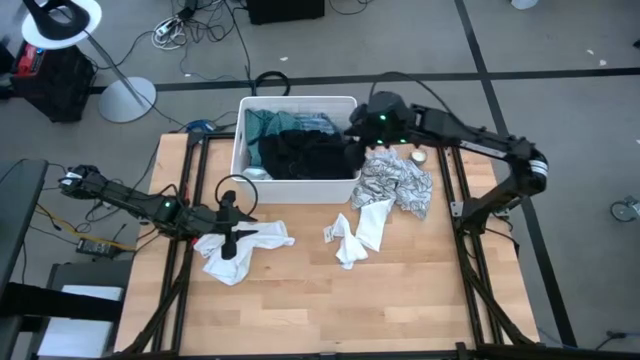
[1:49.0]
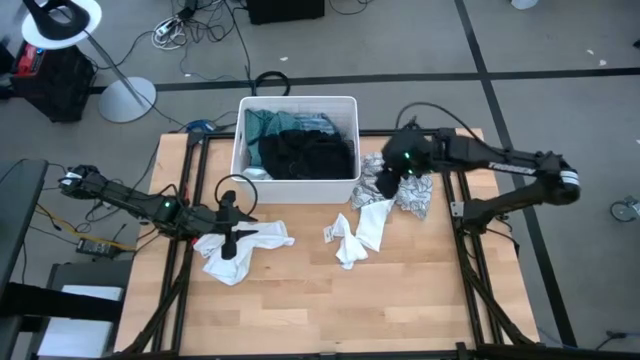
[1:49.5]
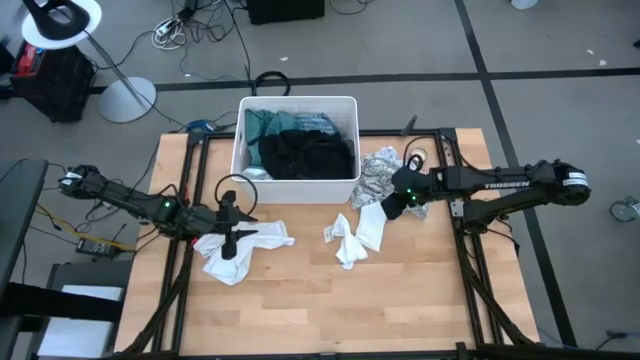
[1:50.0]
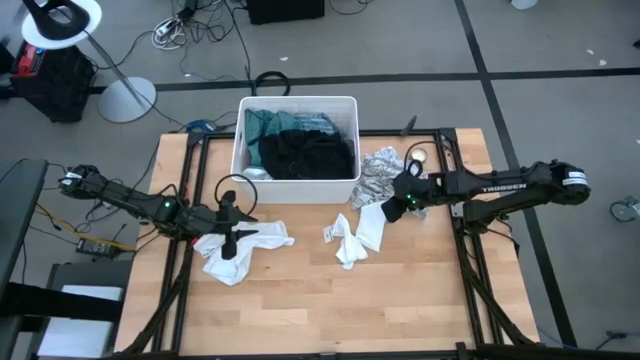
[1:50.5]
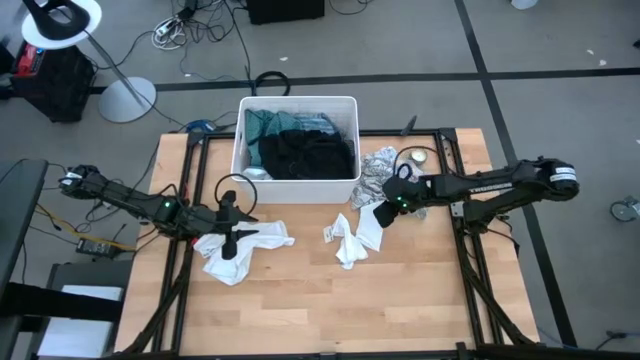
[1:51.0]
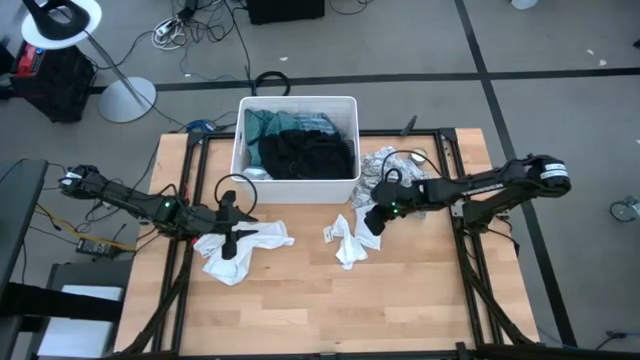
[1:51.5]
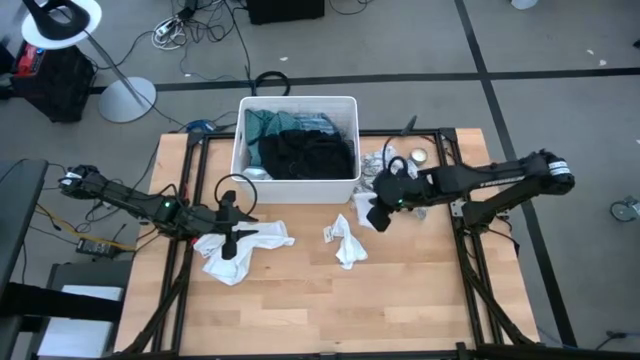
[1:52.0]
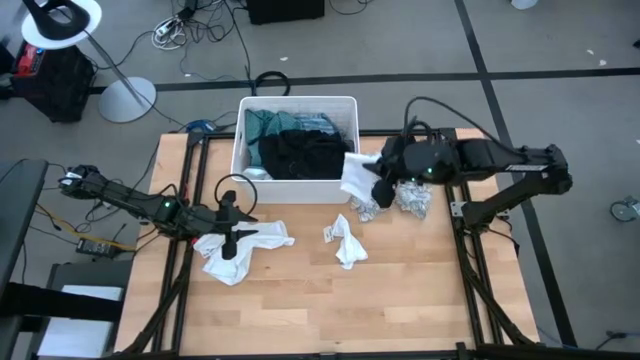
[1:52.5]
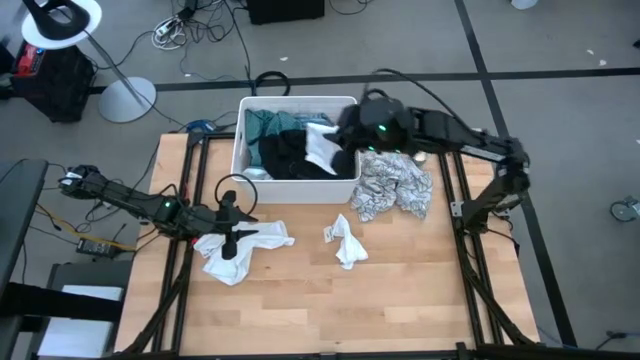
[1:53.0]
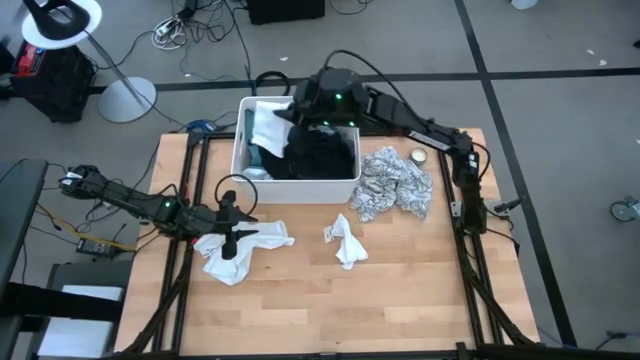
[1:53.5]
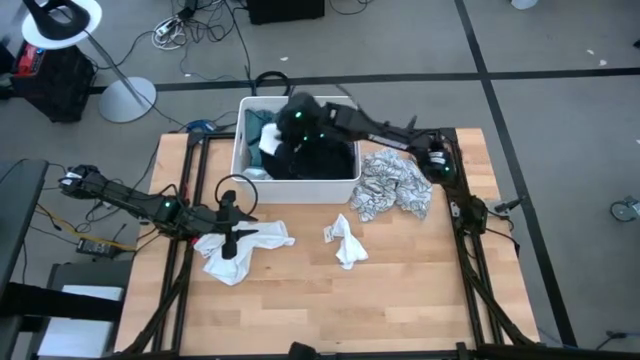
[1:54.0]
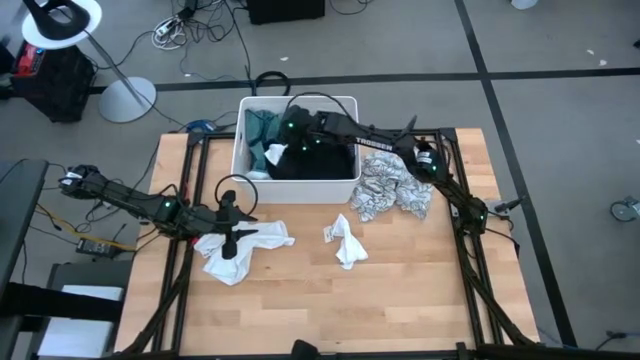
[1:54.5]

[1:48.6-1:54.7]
Task: Sort clothes
Put the white sock into the white laundry bin

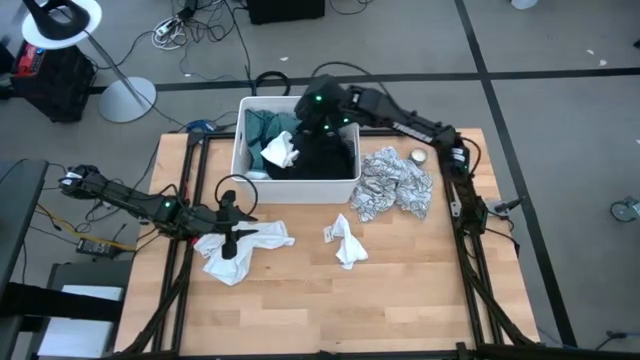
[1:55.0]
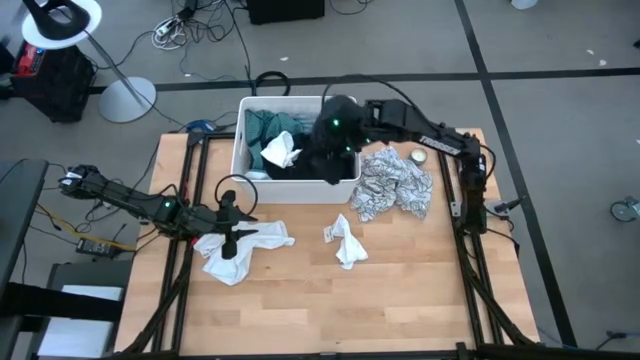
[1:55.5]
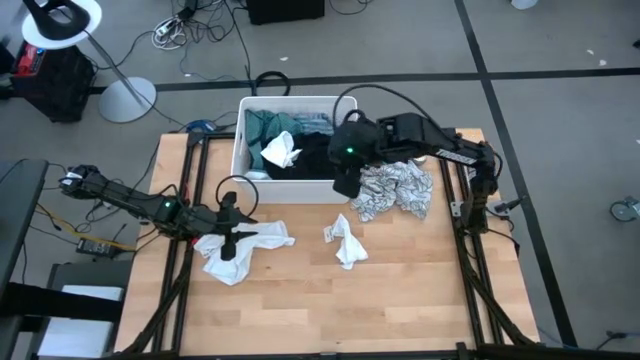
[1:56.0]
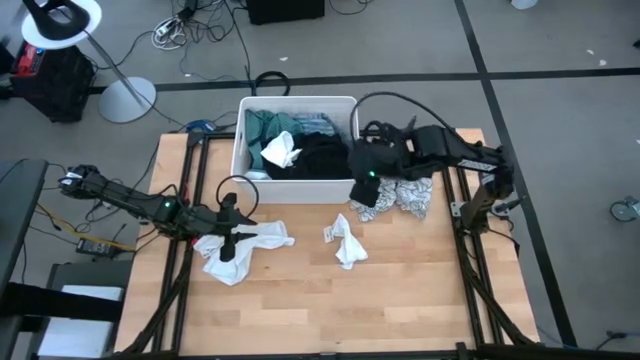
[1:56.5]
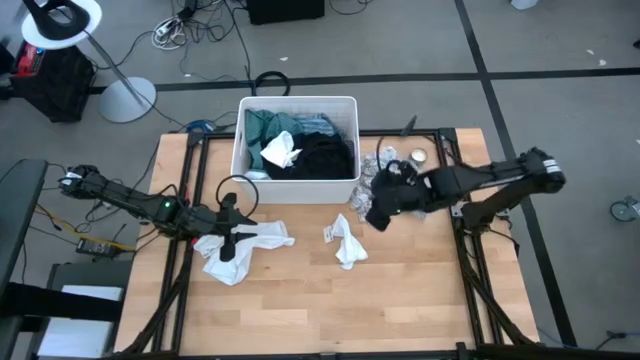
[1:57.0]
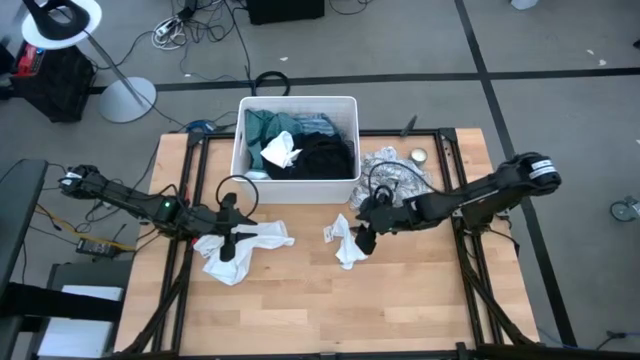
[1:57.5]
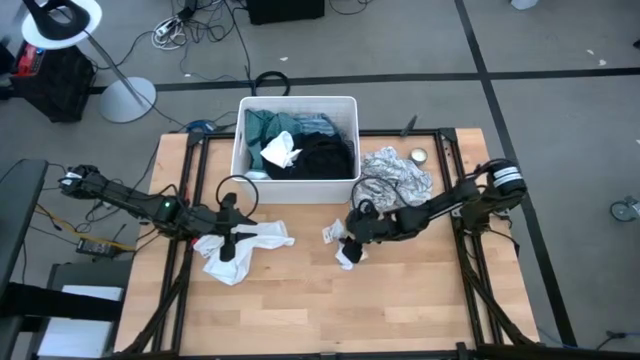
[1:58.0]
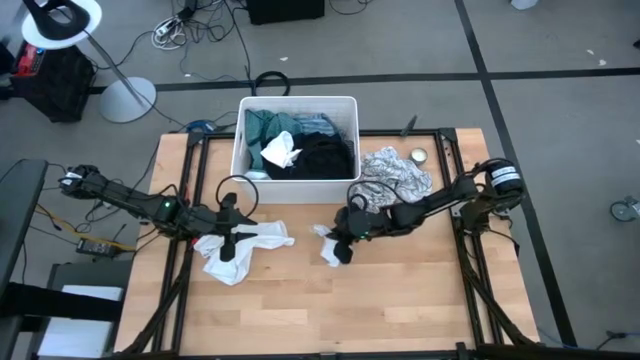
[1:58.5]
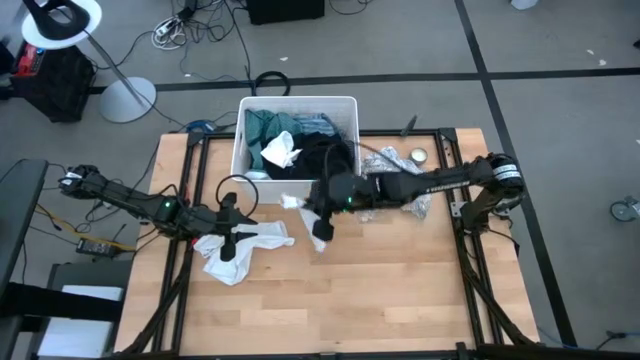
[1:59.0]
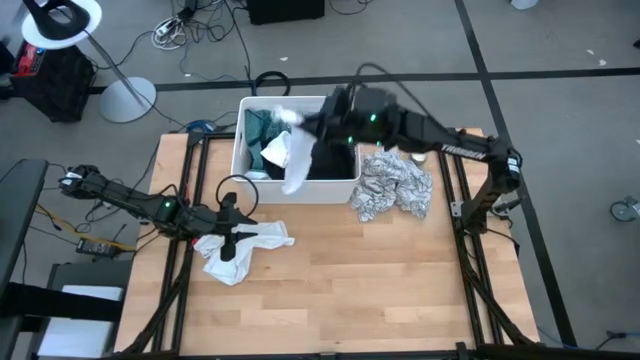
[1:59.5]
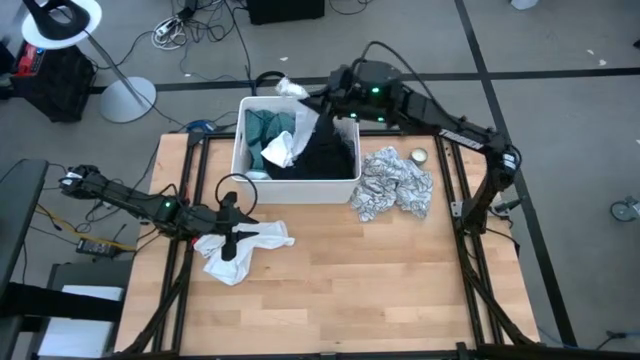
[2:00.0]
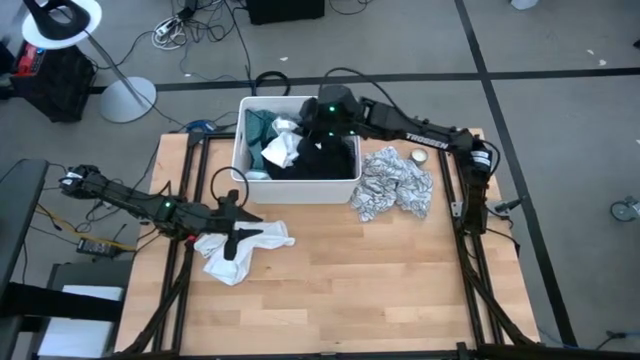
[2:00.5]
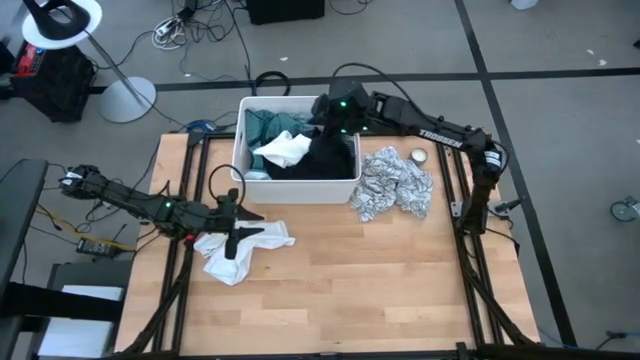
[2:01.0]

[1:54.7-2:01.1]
Put the white sock into the white laundry bin

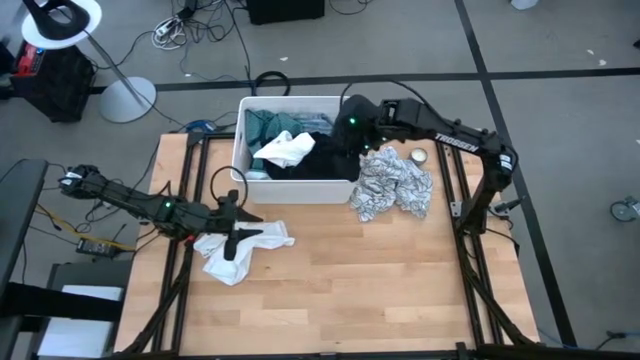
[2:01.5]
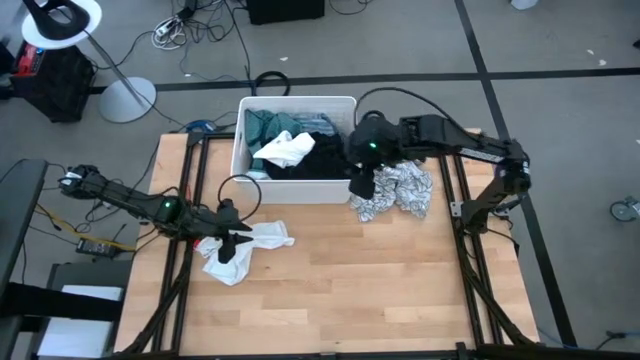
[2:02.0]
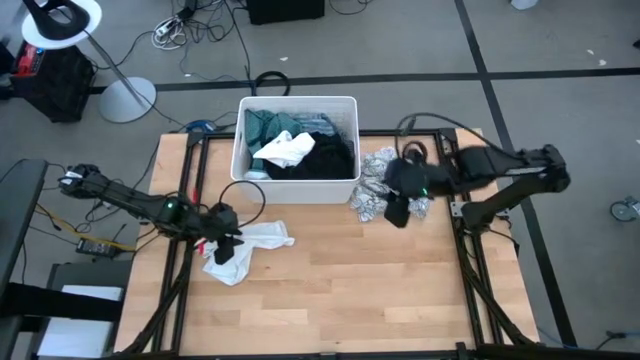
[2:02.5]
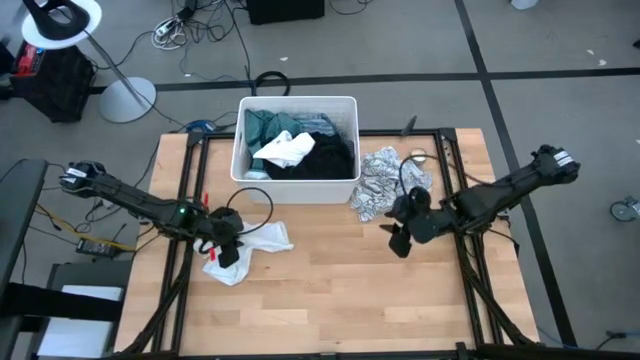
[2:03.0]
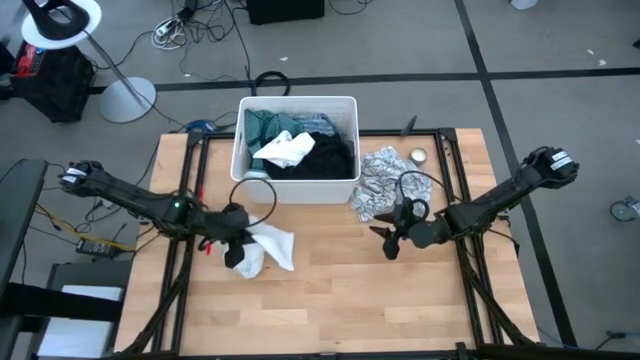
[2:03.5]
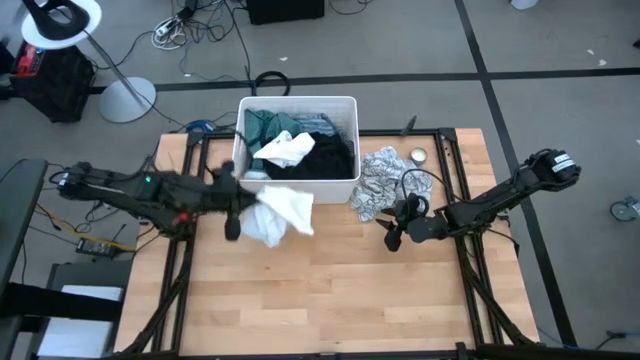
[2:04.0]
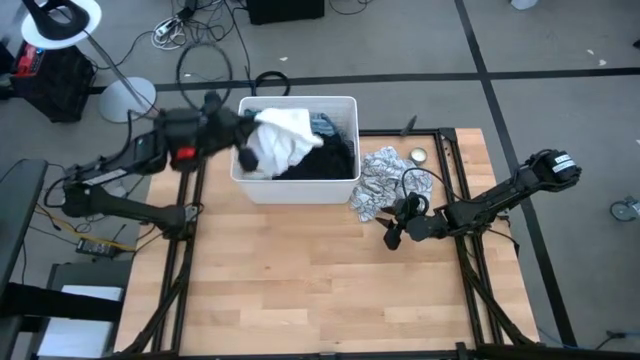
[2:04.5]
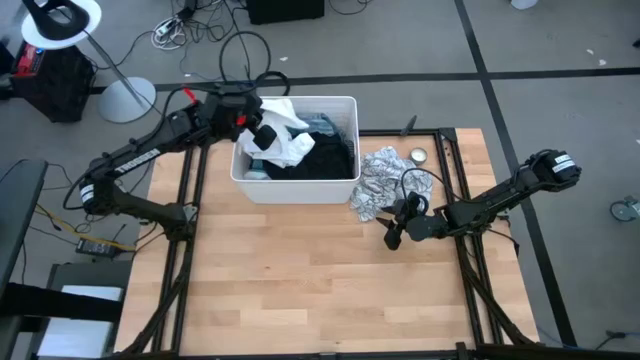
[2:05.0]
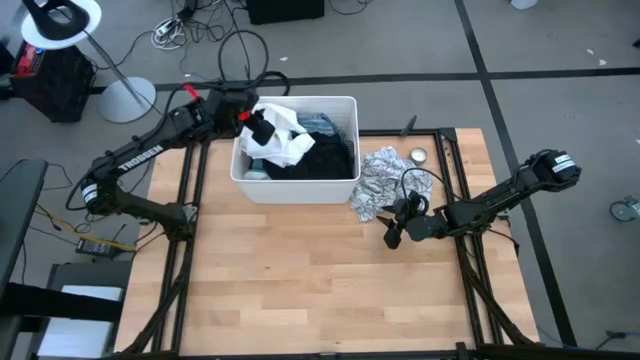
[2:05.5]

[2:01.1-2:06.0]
Put the white underwear into the laundry bin
